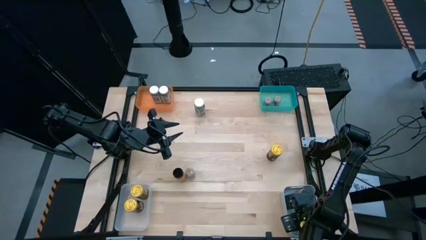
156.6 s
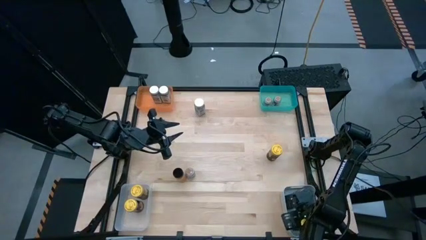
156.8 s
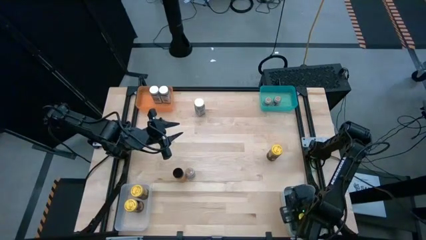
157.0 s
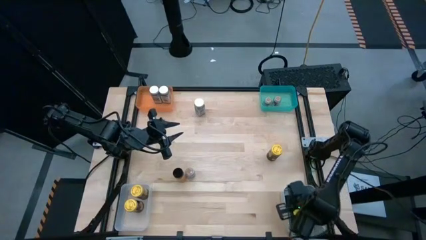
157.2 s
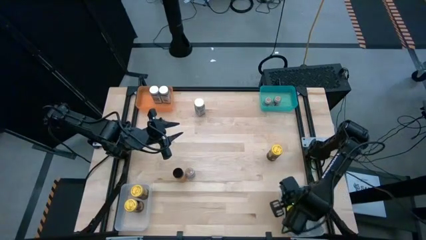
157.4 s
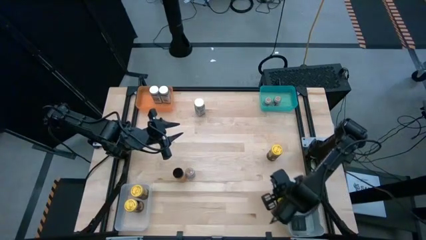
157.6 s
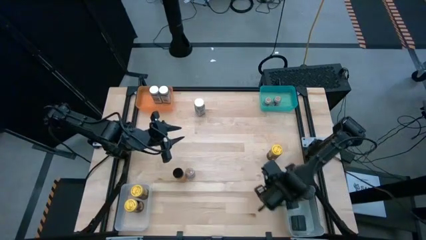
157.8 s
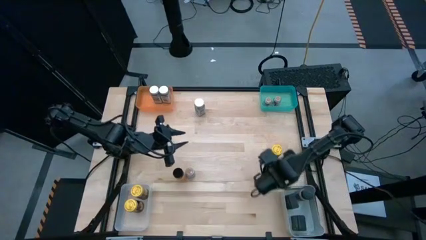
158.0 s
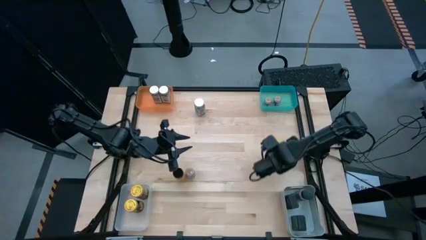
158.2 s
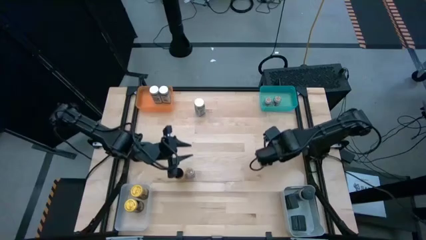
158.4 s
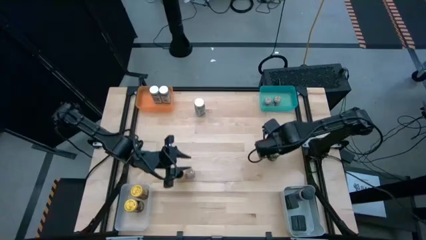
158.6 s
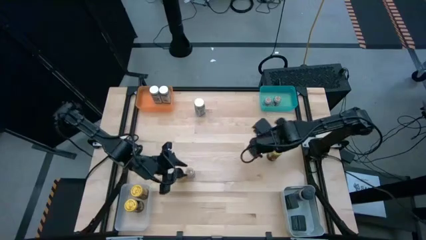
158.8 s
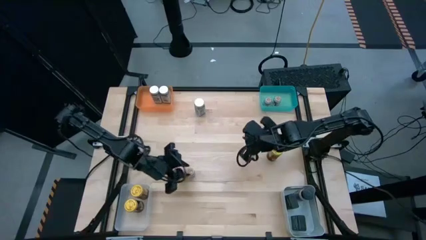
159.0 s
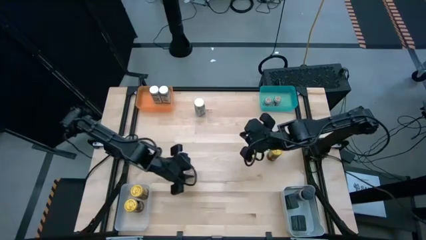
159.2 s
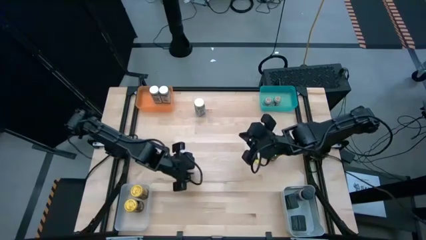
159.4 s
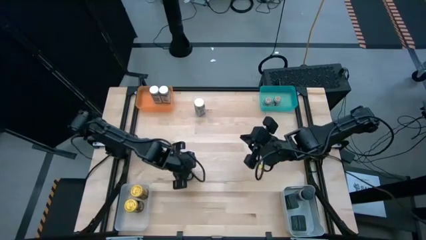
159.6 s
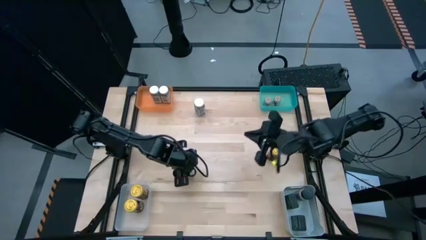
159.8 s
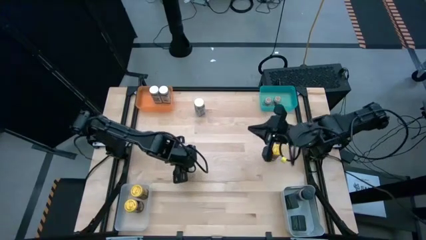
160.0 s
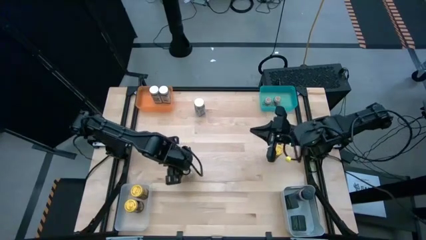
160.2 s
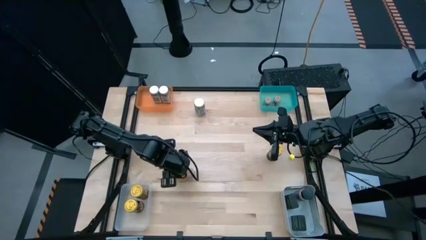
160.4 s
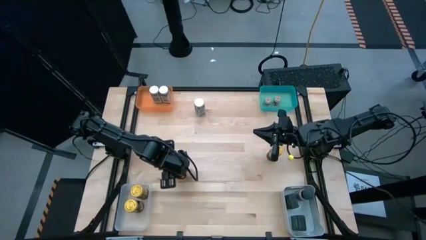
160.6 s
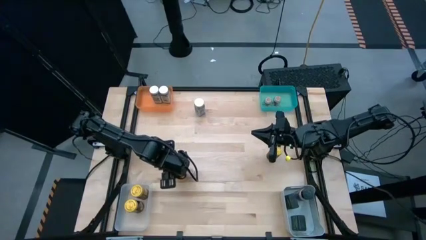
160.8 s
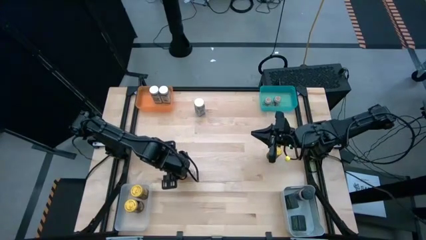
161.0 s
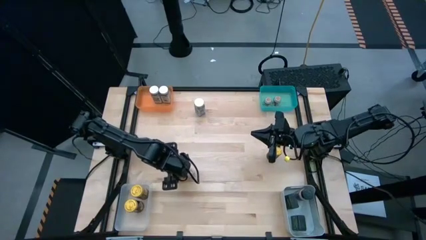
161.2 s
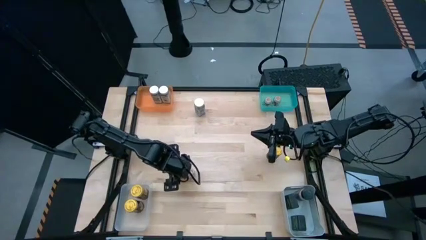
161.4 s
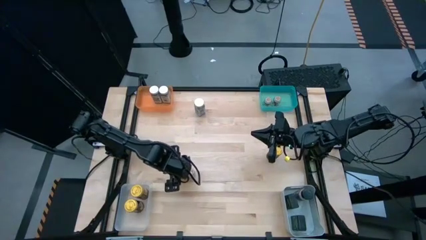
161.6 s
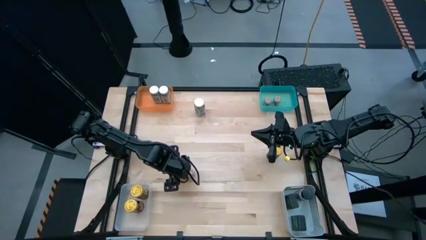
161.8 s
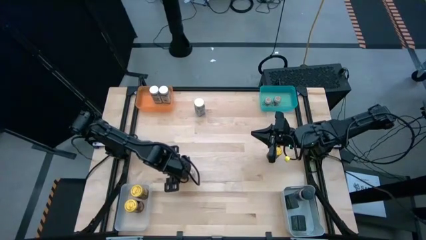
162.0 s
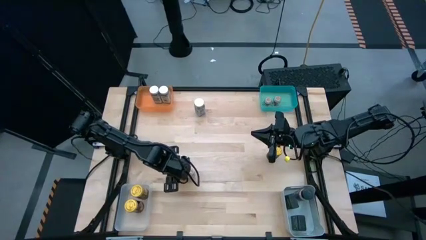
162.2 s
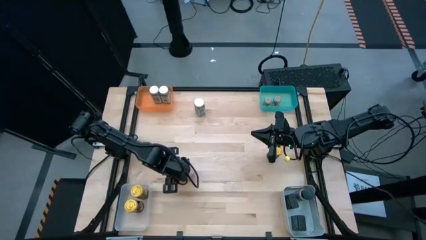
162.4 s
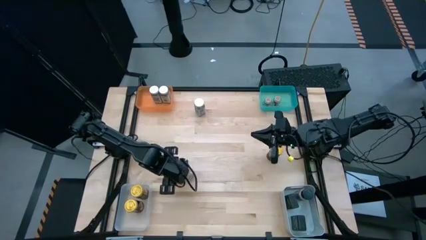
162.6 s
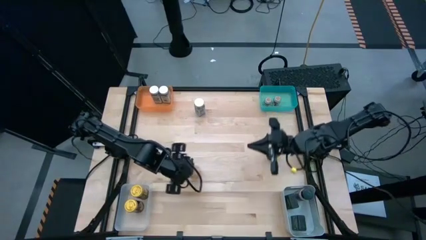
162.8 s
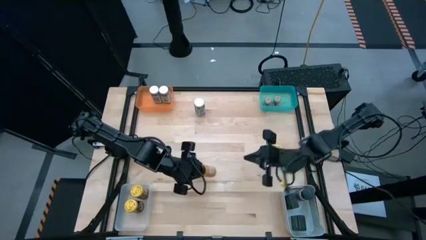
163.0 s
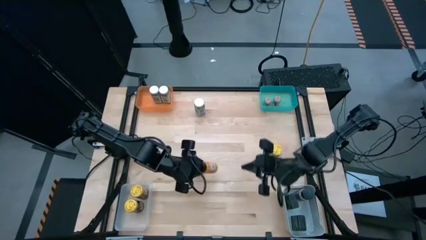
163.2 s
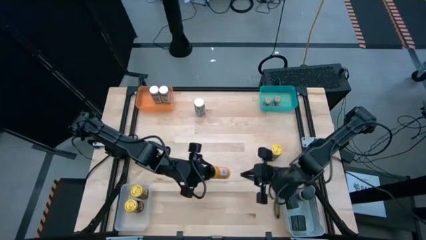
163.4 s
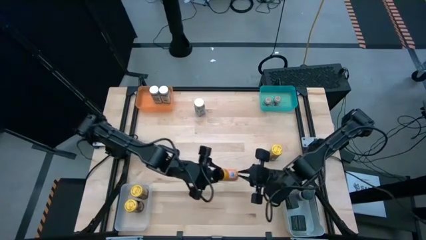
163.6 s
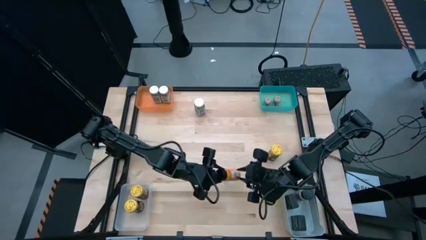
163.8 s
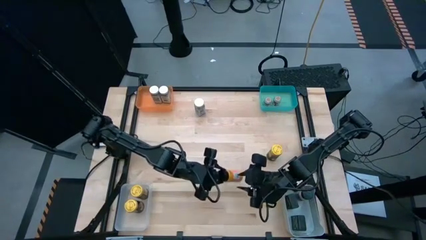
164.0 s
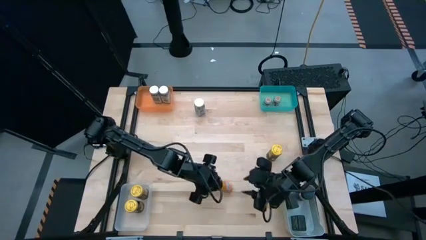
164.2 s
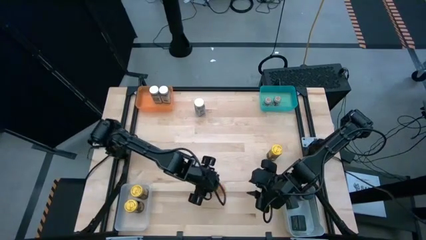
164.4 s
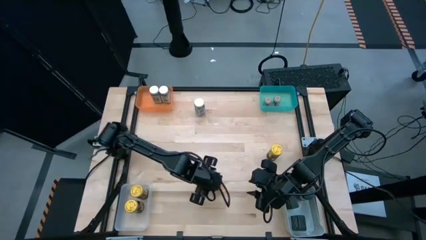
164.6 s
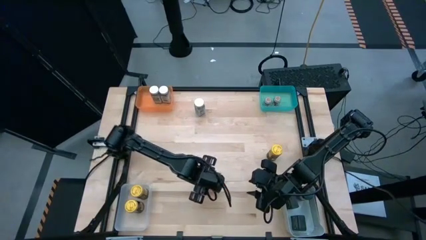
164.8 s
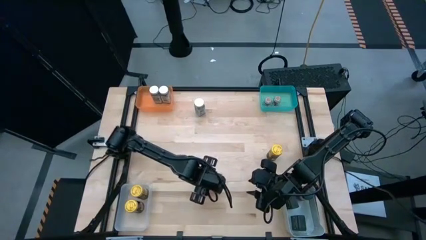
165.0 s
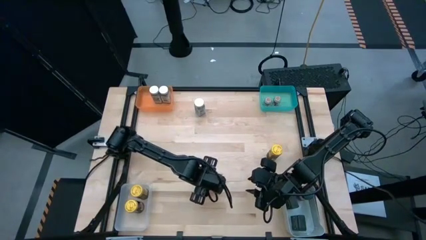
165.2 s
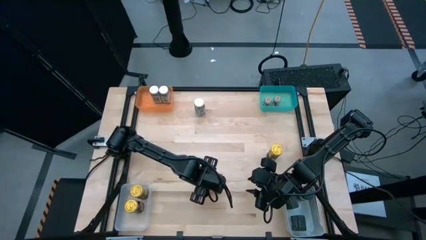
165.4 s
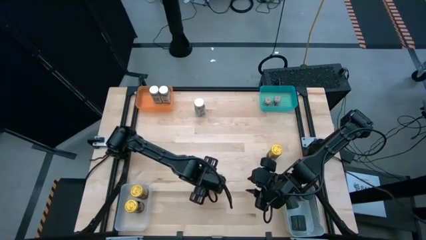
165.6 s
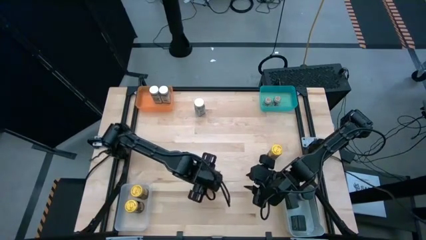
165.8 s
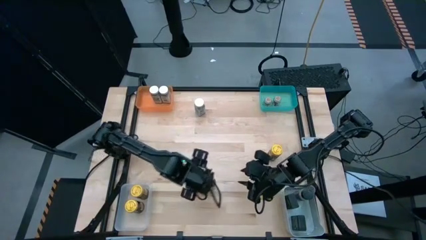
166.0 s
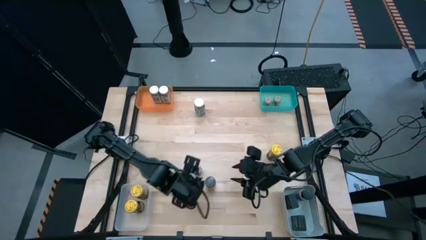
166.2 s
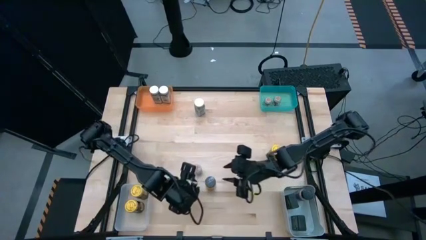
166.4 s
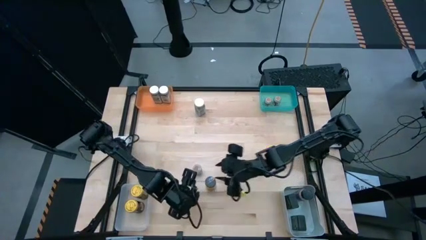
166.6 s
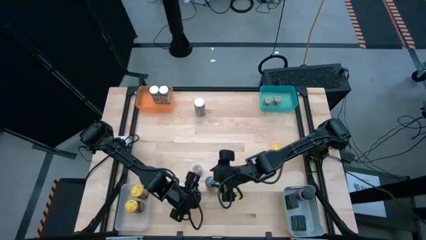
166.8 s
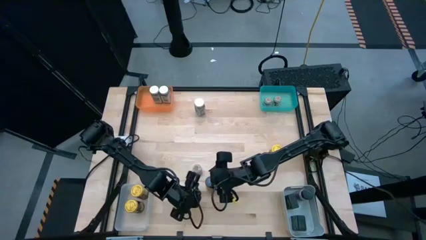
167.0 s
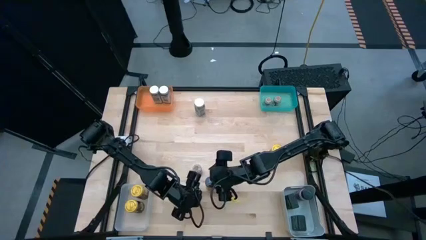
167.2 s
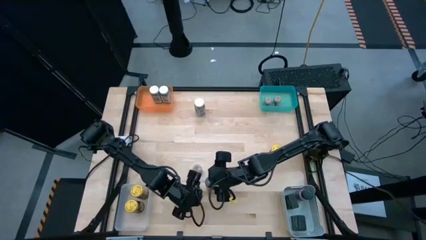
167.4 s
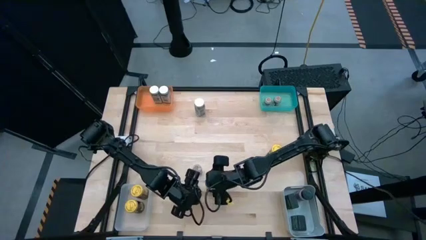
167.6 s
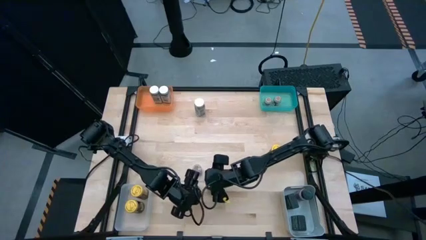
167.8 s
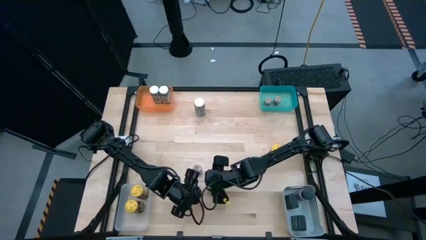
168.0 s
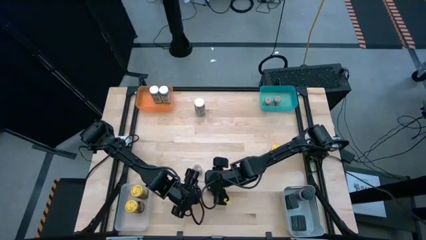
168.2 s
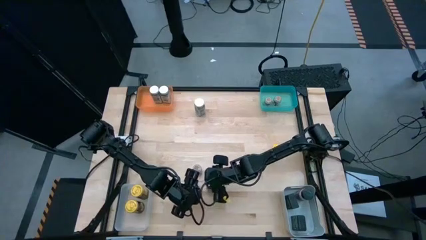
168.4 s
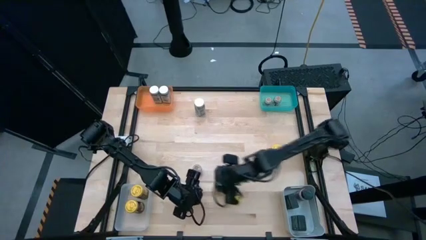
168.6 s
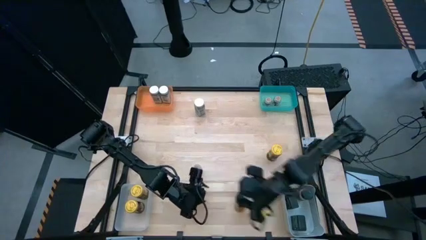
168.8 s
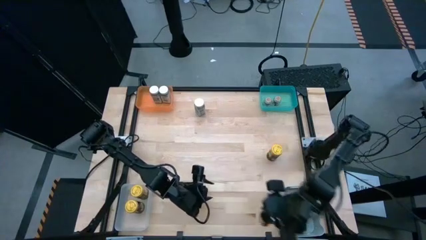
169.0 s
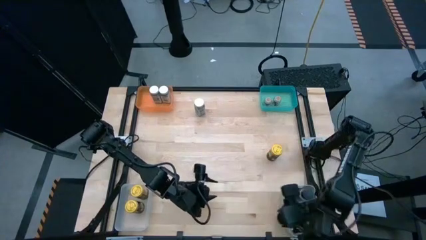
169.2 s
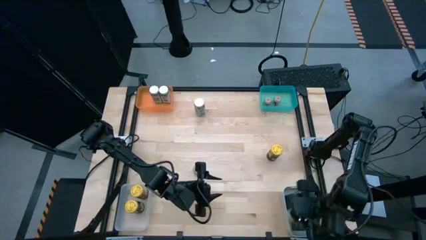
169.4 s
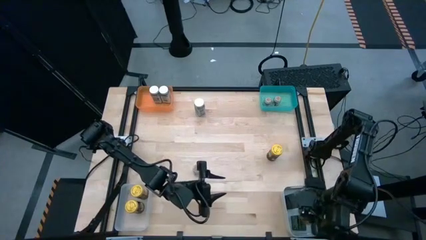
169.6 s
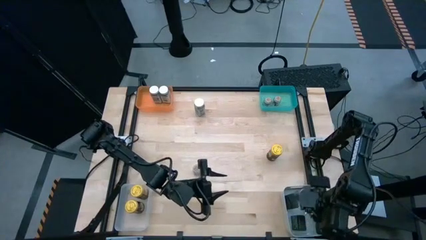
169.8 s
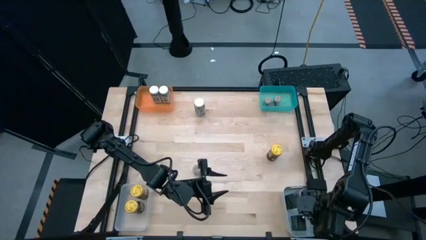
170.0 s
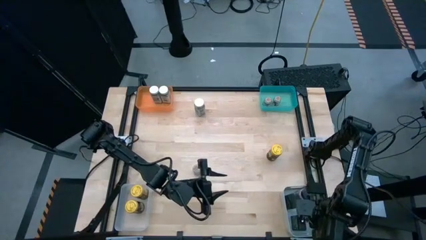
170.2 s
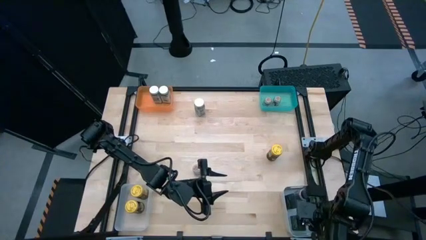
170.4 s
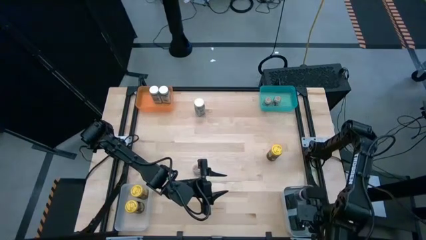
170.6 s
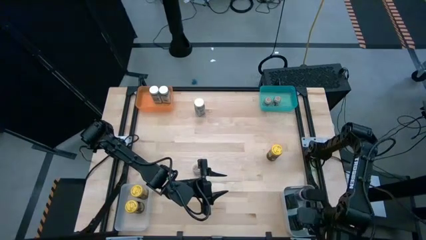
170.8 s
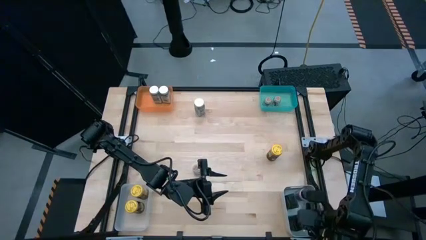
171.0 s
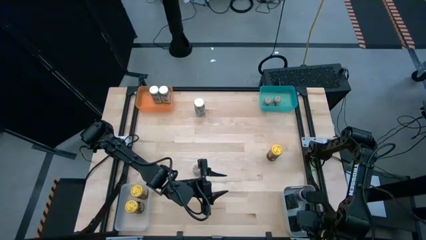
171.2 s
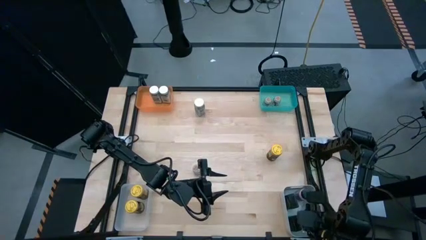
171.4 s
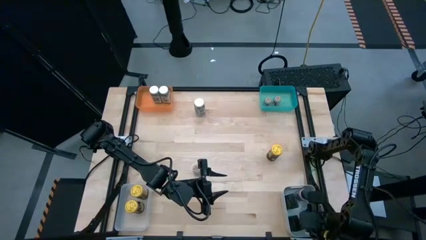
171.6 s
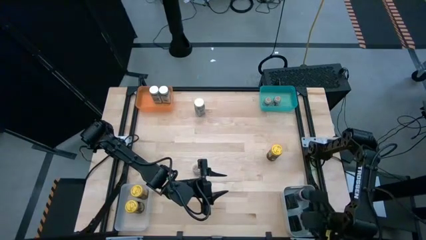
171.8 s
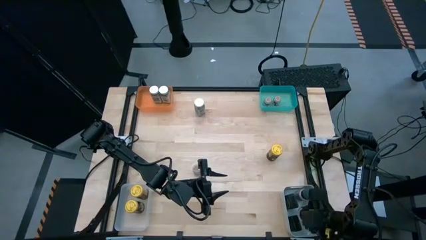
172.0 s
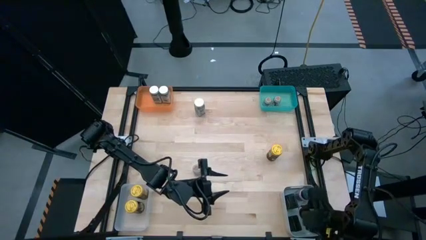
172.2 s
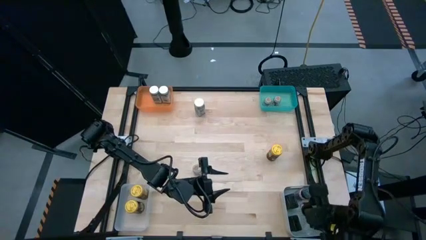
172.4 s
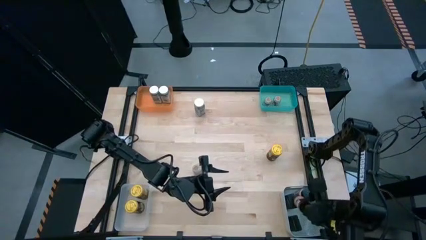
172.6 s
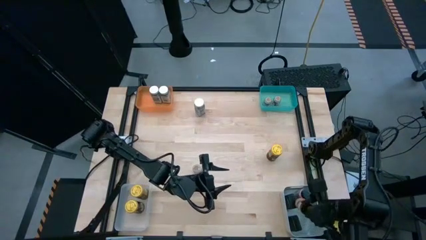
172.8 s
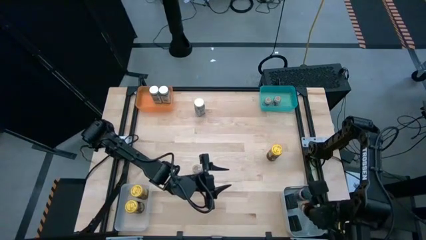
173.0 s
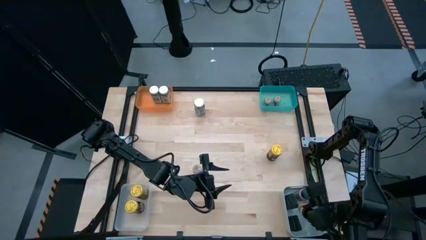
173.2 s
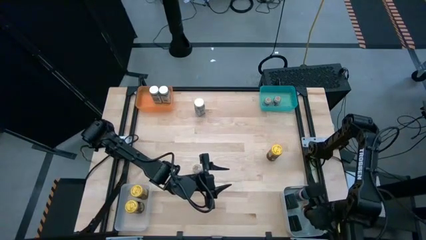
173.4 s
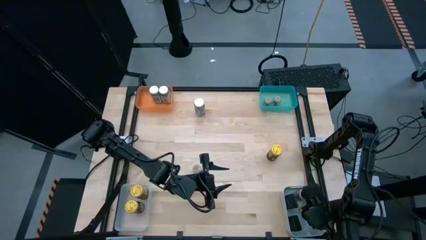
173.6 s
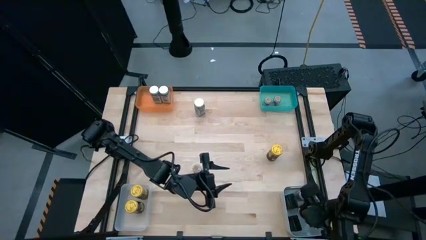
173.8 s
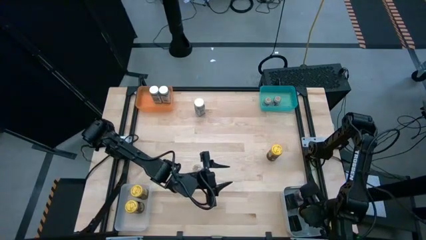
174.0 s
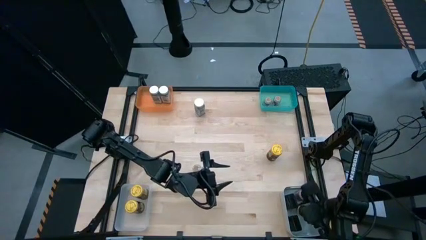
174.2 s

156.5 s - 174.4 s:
Task: Sort spices by type
Put the black seasoning bottle into the gray bin
